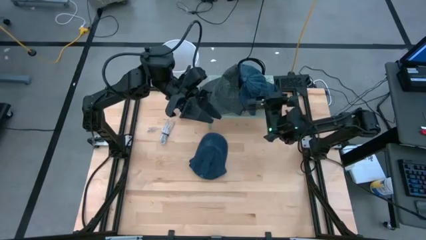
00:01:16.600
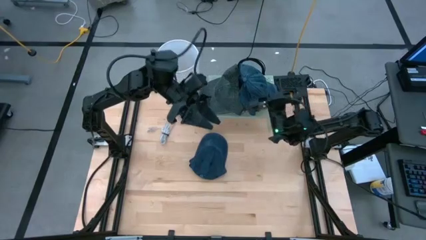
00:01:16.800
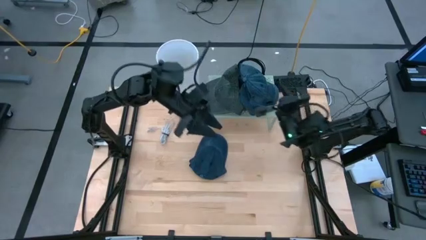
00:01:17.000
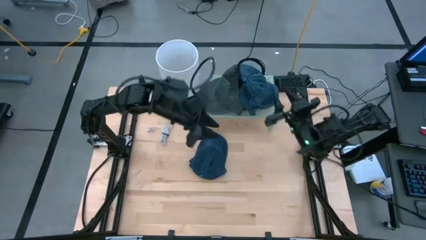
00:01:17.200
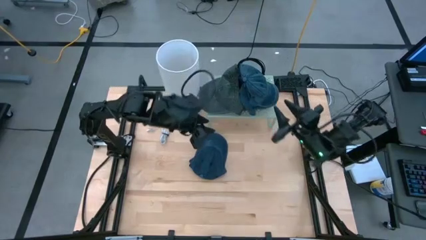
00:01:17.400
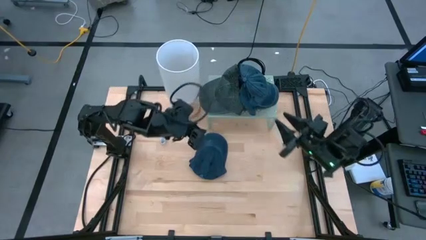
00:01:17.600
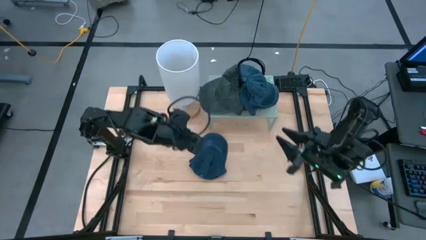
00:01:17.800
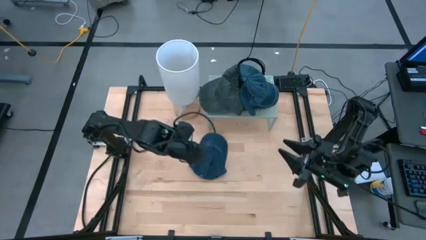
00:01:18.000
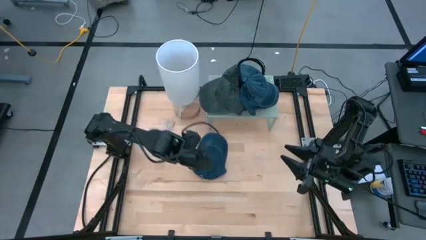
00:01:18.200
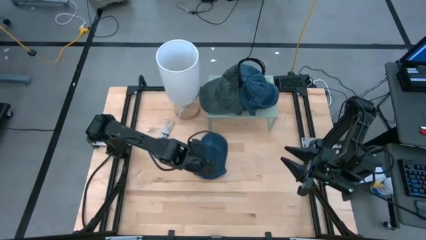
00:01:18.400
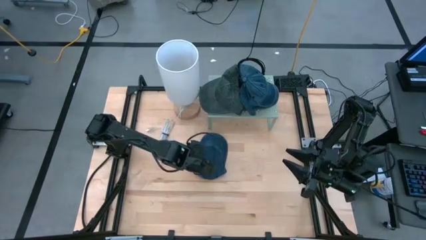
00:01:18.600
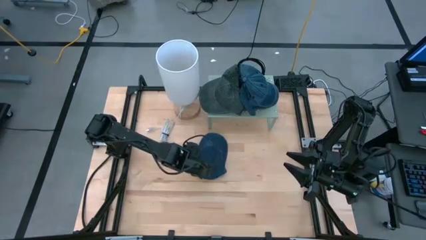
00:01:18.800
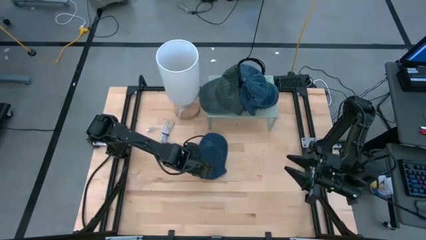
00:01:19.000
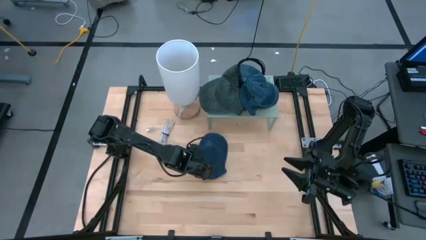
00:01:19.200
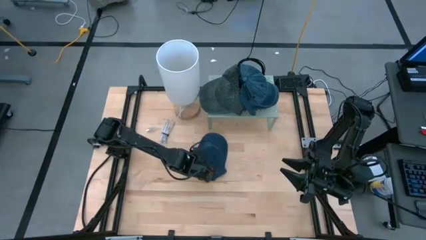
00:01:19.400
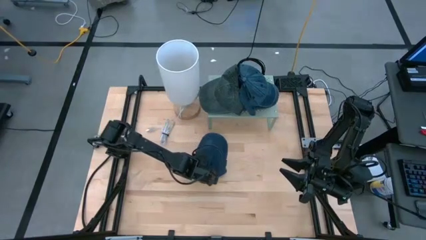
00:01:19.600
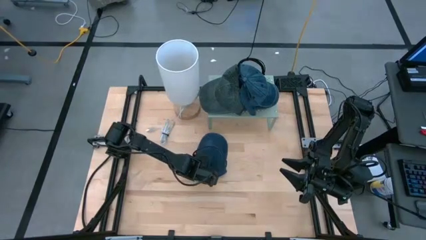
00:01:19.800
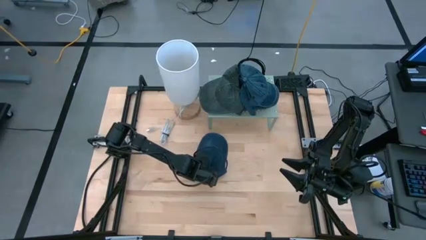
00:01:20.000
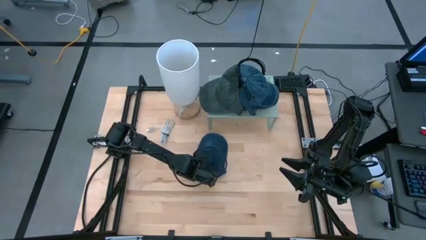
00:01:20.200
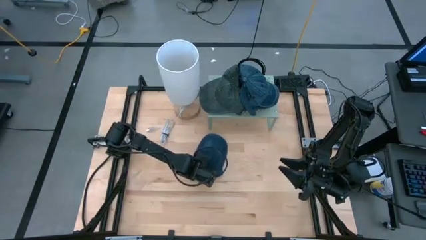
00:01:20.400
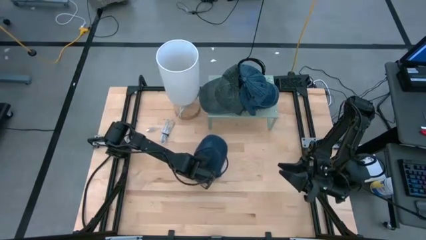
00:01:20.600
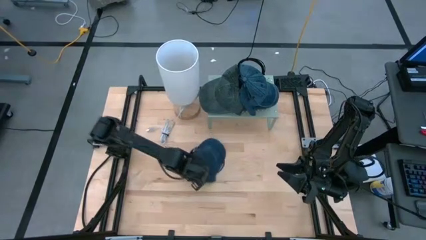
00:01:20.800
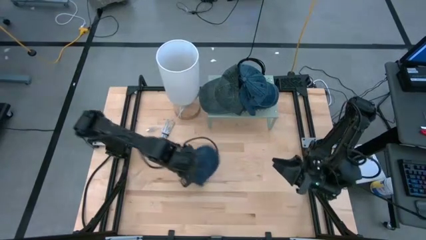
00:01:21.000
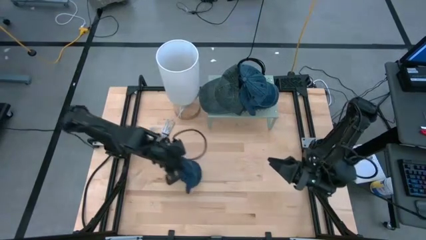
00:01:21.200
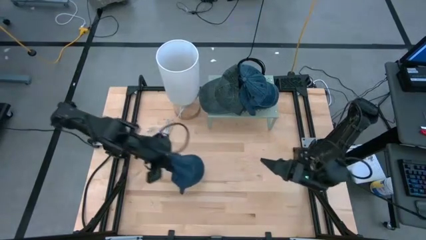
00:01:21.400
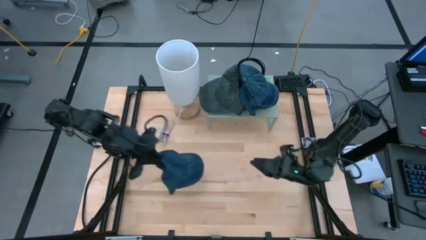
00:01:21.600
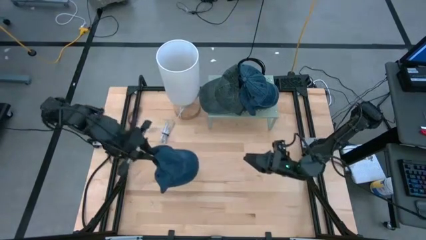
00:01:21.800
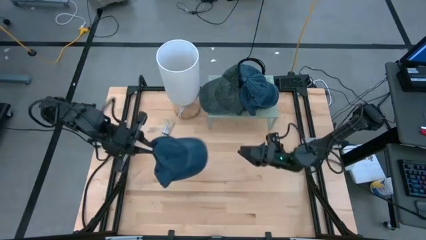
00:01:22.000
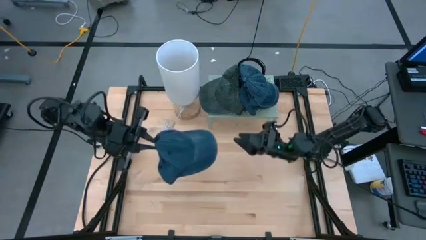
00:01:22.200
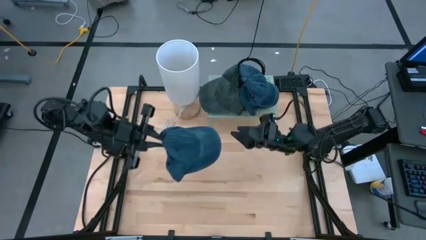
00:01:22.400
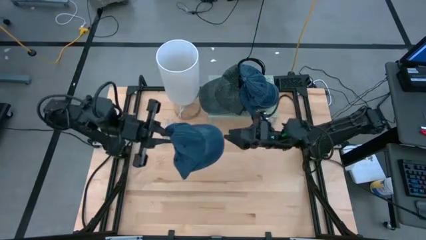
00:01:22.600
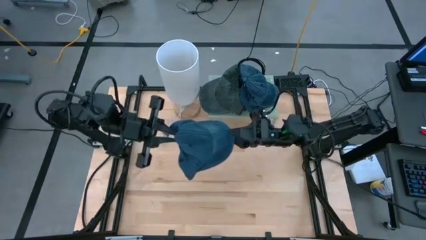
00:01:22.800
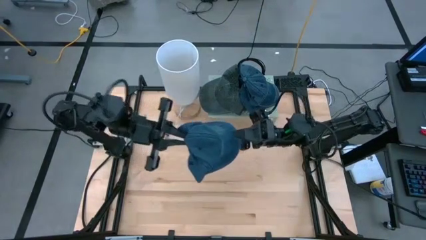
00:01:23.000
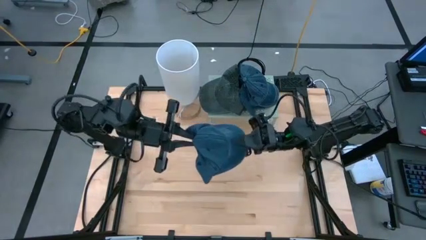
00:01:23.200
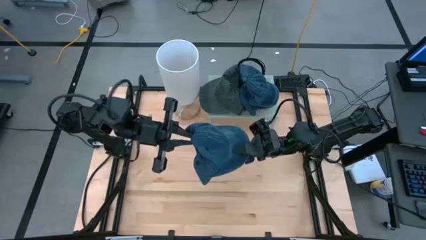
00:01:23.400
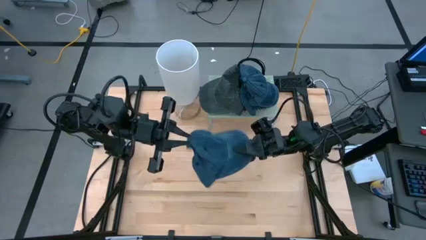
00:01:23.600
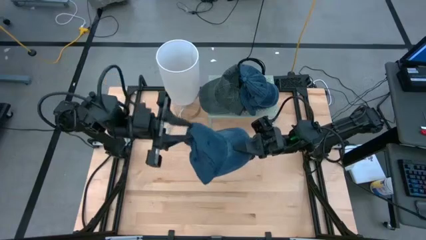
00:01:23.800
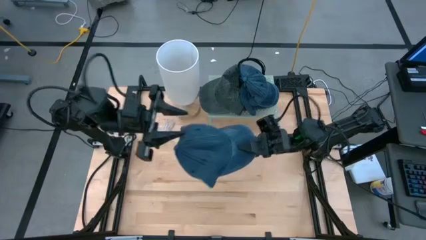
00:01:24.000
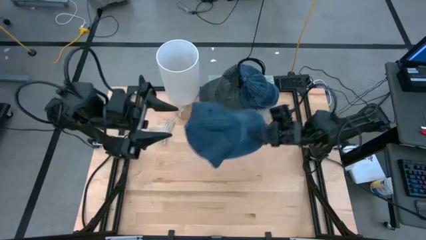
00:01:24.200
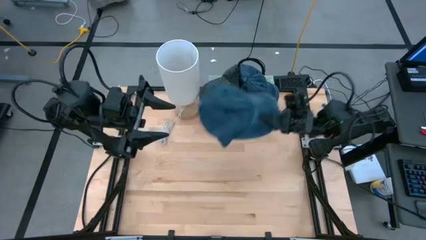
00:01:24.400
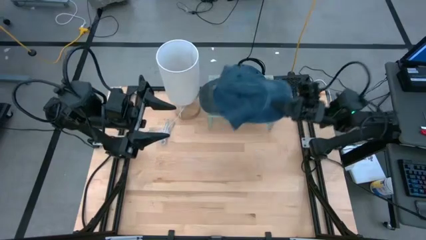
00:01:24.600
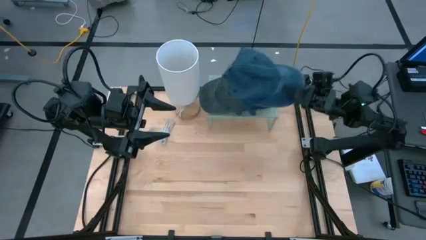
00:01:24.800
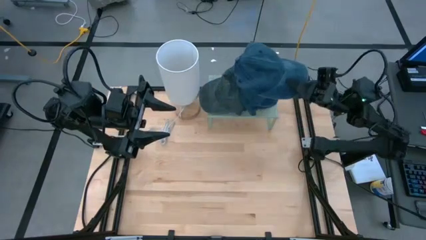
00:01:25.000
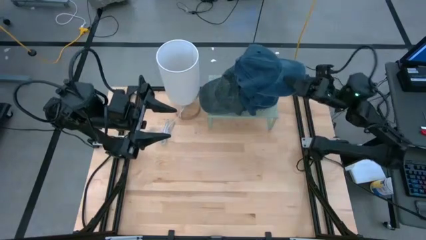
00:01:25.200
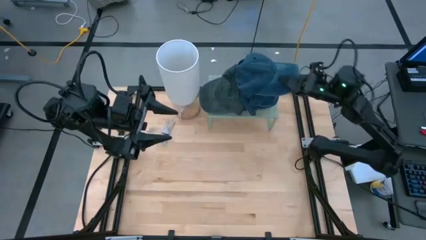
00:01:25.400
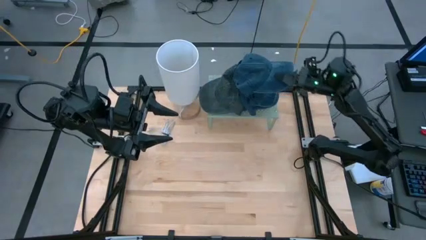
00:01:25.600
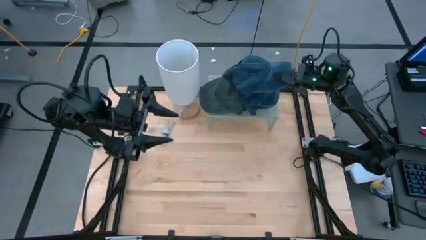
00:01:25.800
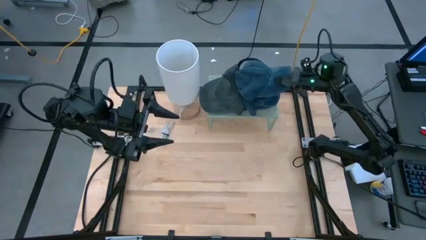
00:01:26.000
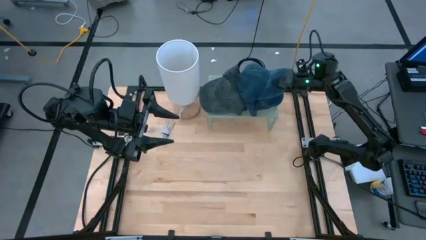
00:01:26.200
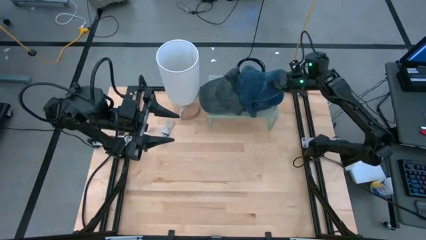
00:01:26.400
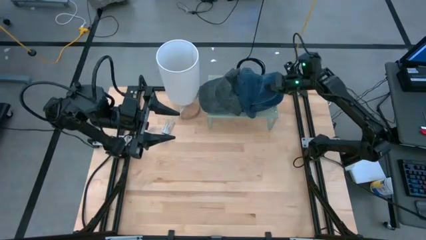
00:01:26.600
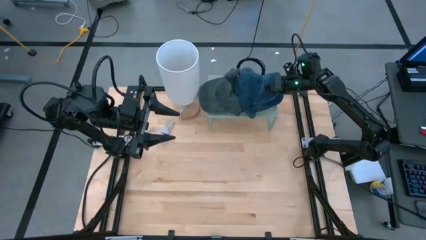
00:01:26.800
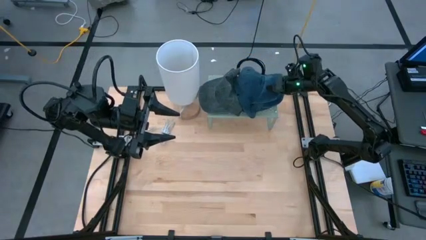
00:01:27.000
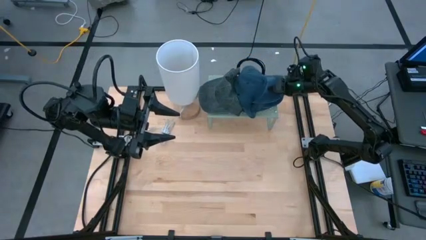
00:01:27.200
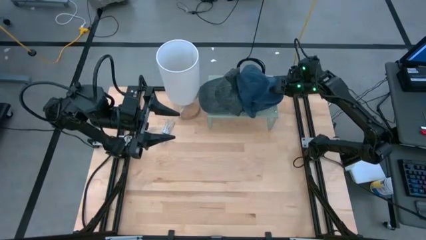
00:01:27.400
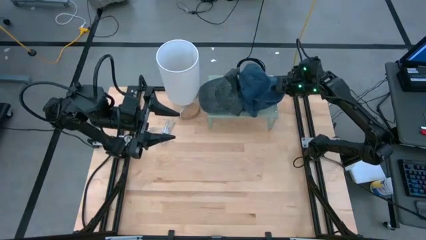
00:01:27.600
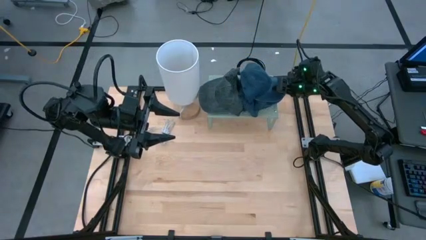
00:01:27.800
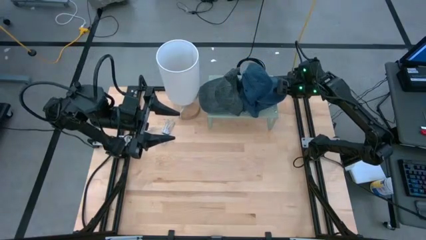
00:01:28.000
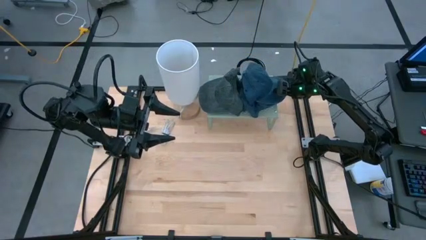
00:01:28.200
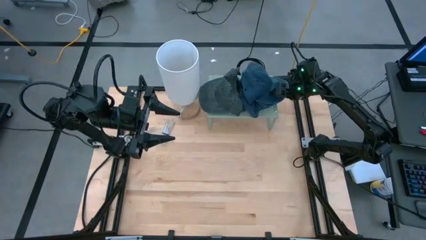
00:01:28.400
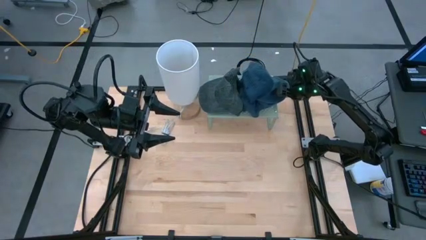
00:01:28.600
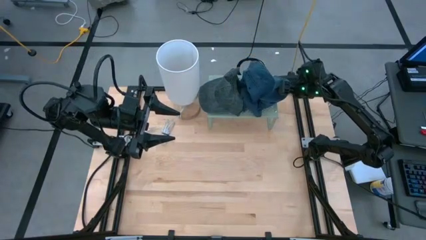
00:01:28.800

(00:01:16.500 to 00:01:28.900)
Task: Pick & Place hat
Stack the blue cap on the blue cap on the shelf

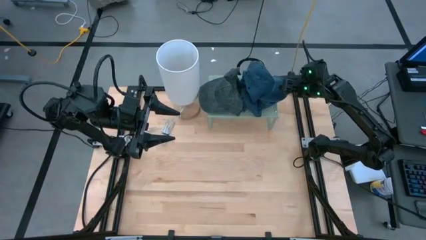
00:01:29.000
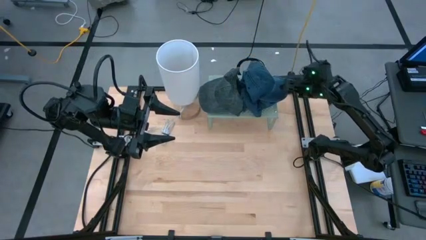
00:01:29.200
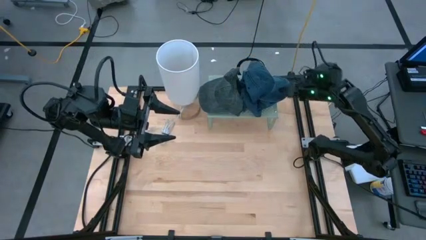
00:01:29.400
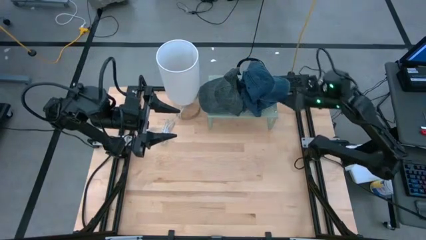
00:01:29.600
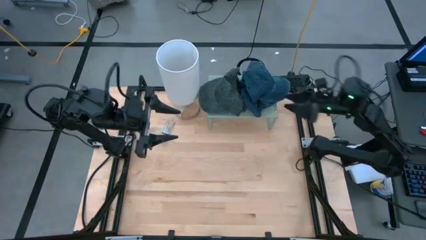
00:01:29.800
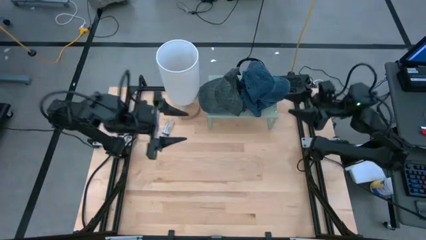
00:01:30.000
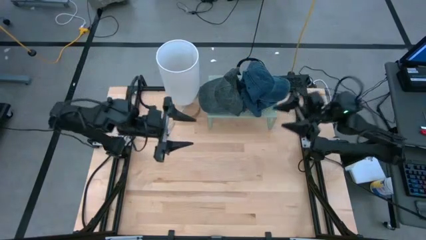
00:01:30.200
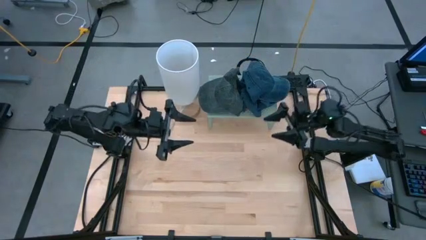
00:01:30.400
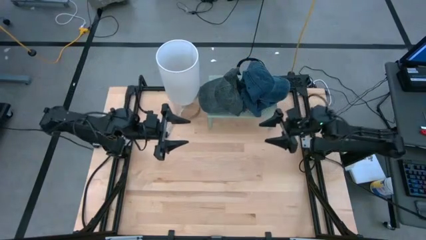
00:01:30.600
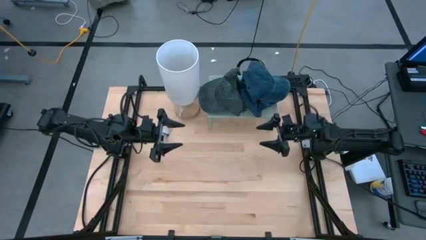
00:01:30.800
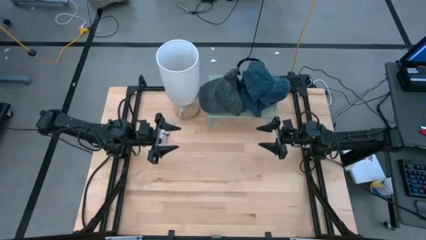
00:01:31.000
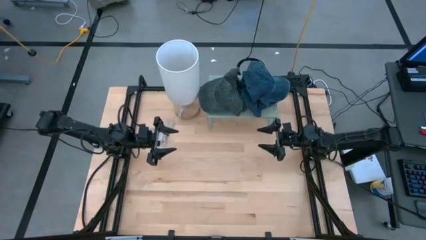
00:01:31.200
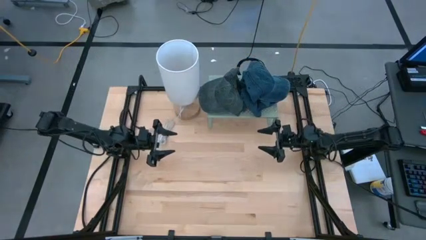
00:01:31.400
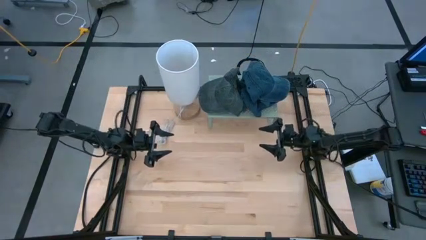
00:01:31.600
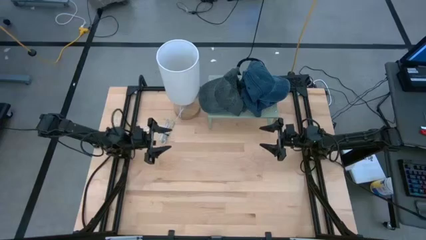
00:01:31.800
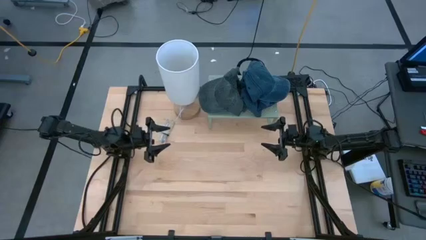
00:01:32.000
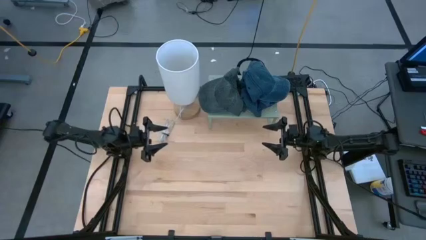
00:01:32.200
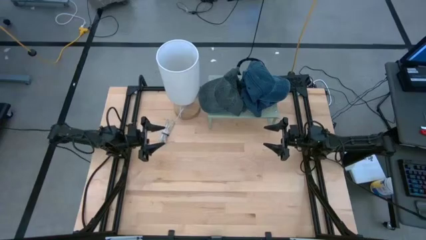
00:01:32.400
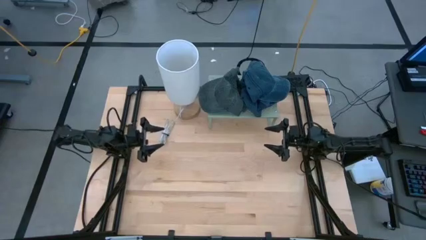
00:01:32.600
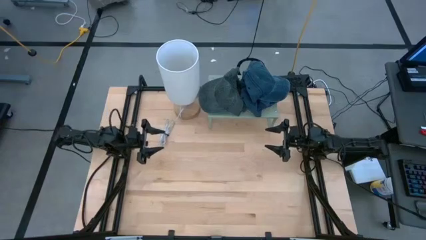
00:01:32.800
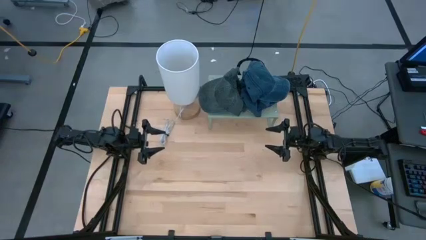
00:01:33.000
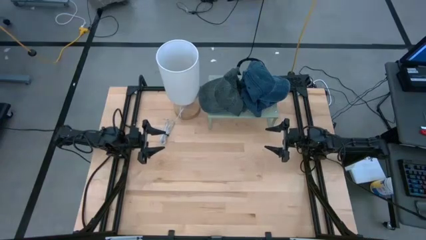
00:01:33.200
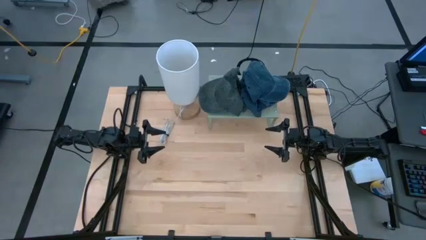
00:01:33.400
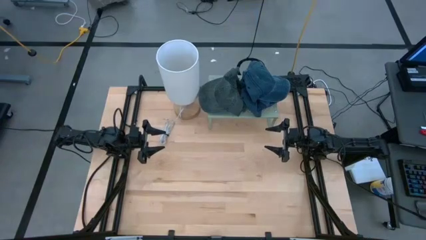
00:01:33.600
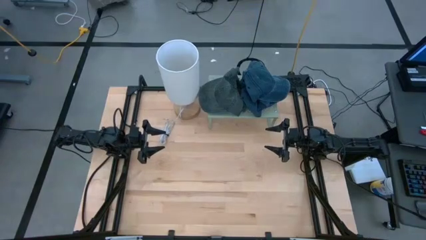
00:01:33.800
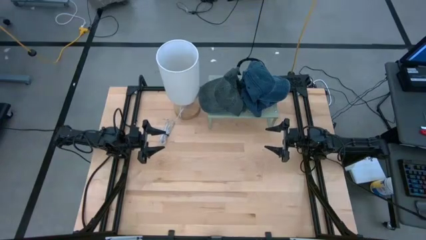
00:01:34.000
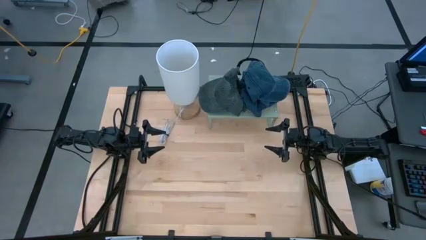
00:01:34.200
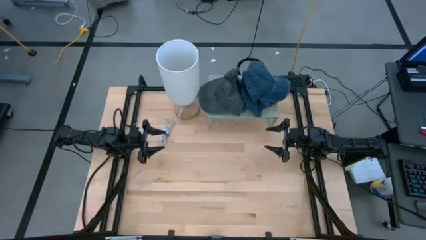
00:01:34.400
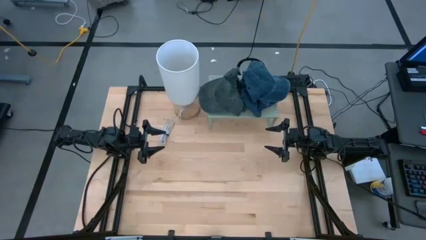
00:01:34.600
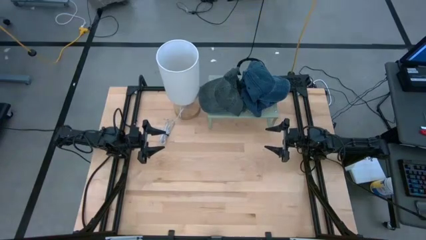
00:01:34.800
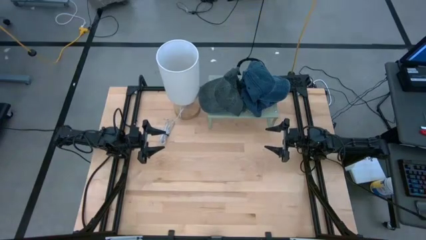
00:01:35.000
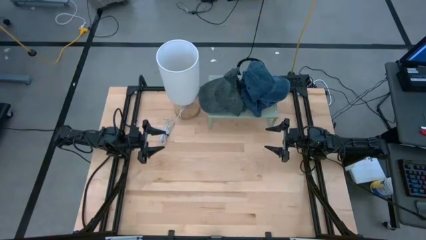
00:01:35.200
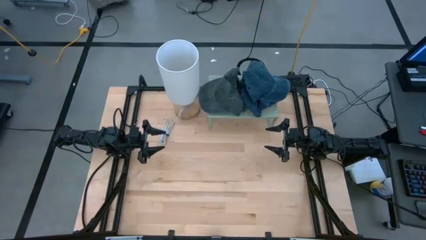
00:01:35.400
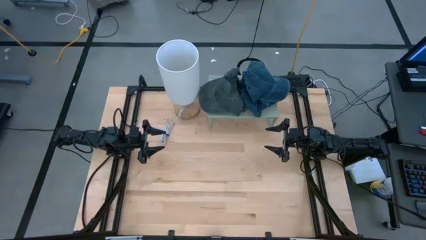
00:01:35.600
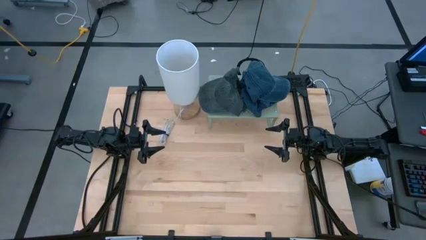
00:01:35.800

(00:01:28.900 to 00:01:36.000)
Return to Home Position
